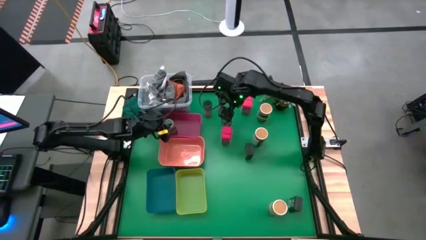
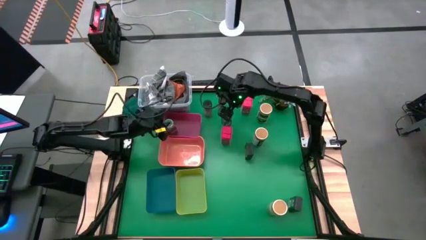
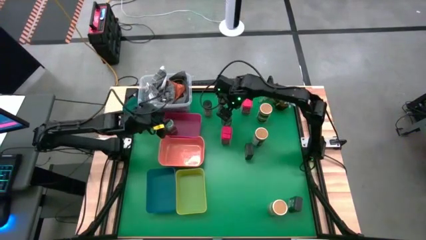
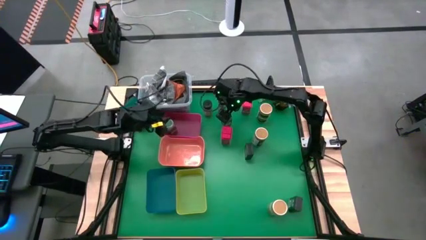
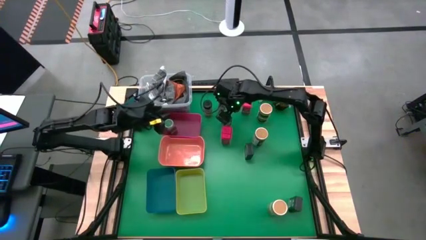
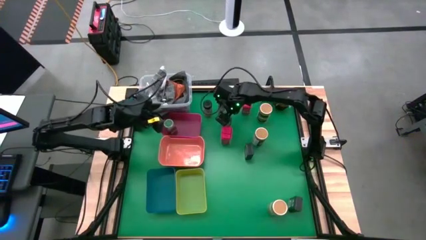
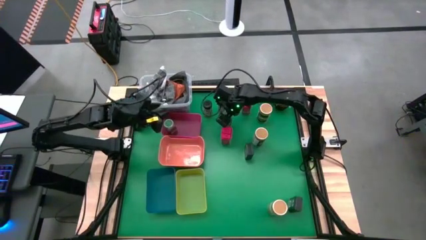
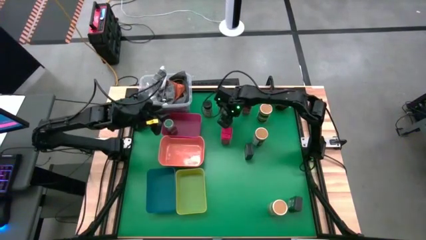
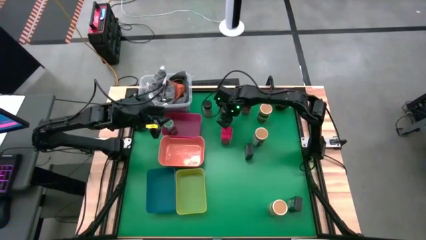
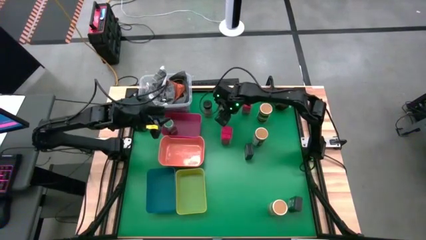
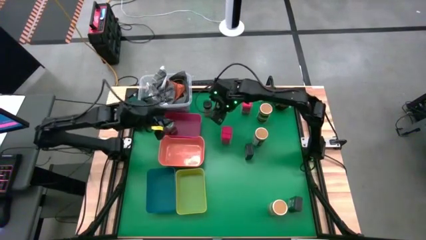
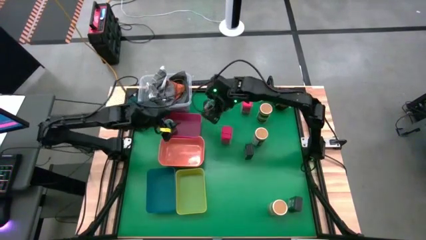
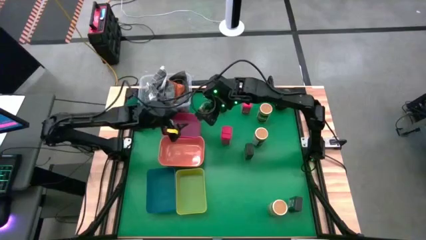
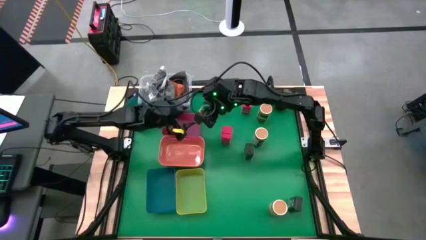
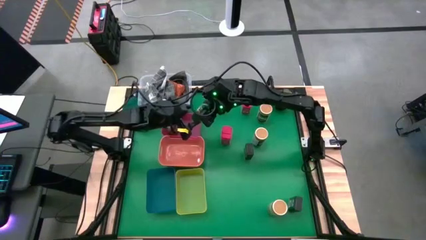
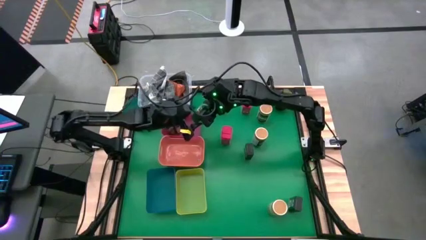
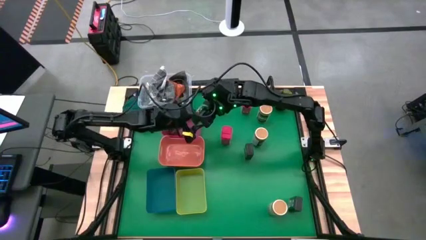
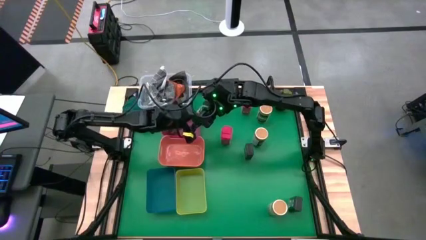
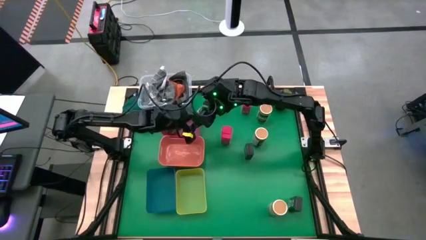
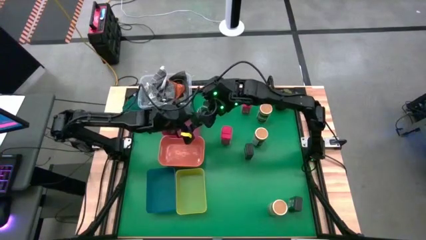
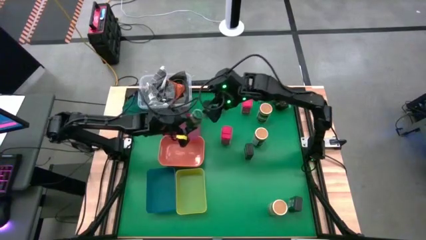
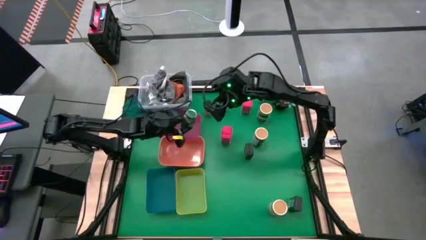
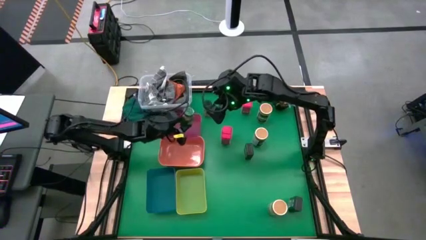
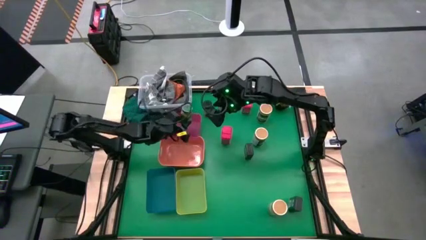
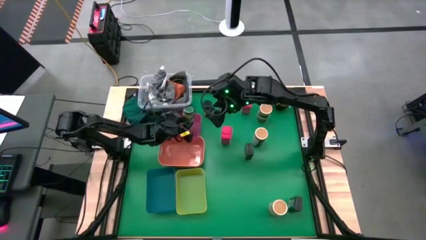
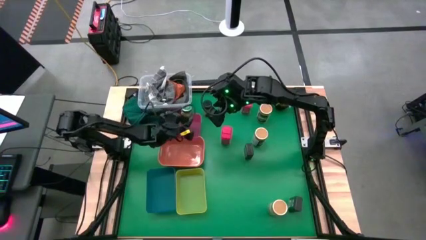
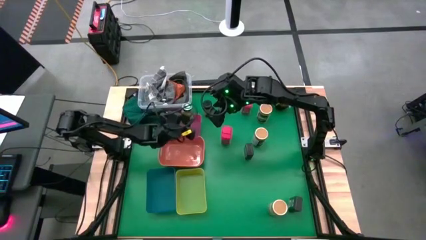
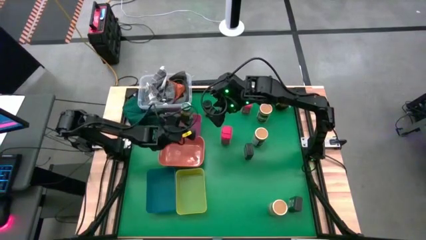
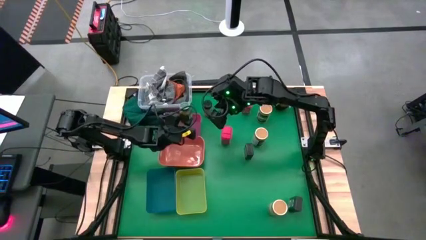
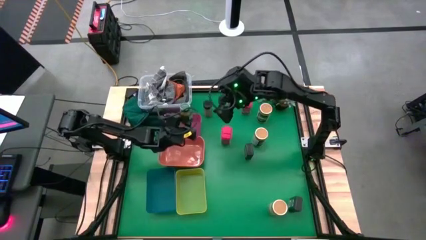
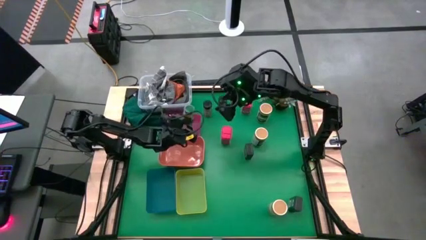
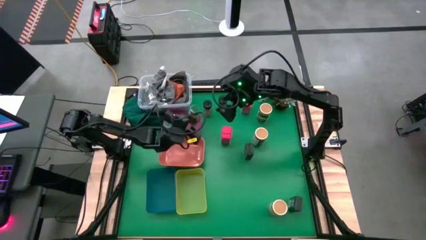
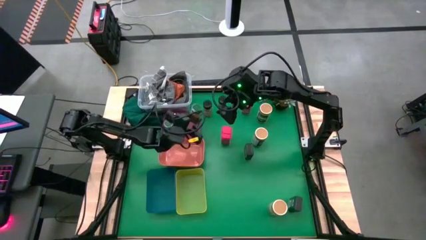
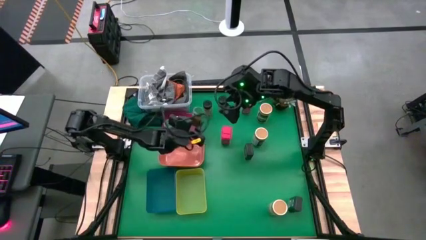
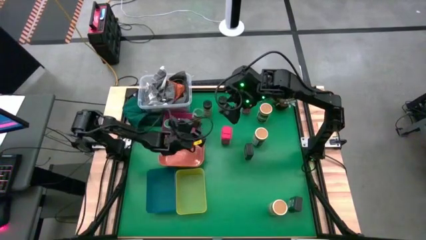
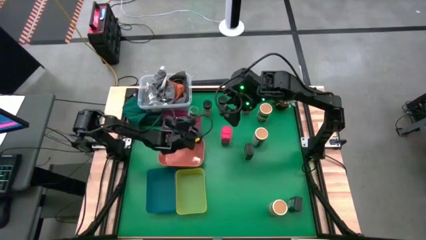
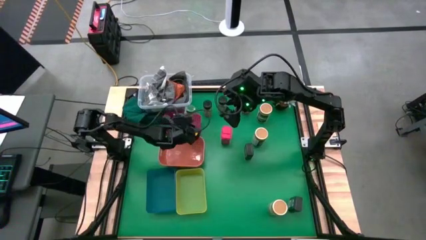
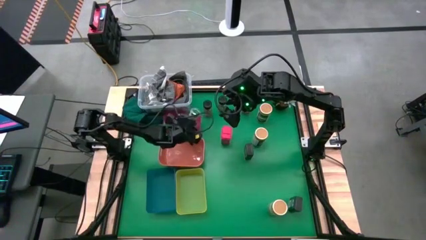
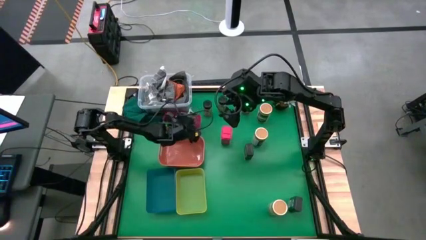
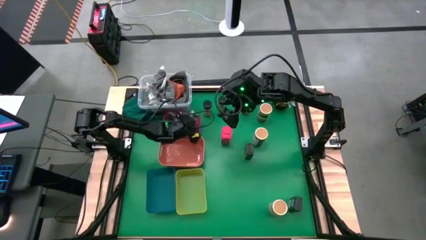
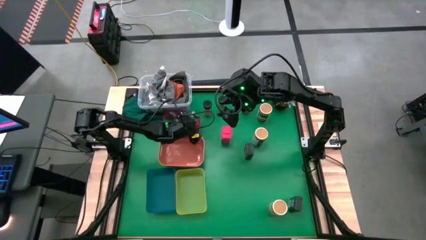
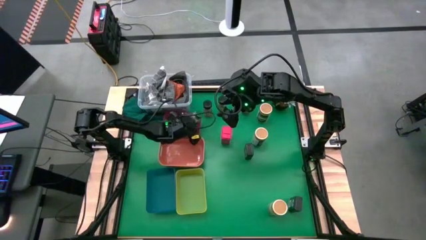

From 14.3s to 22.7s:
Task: Sort spices by type
Put the green seasoning bottle into the red bin

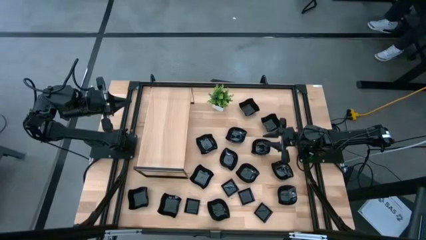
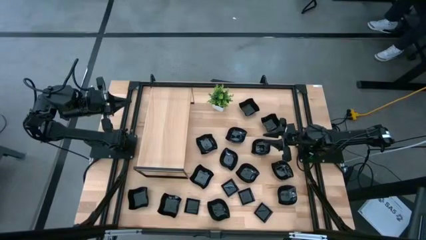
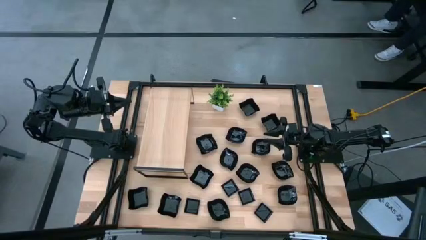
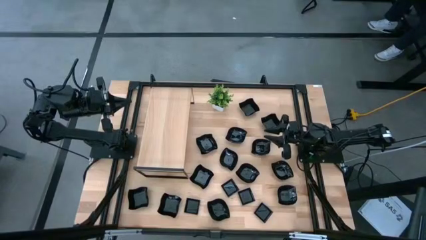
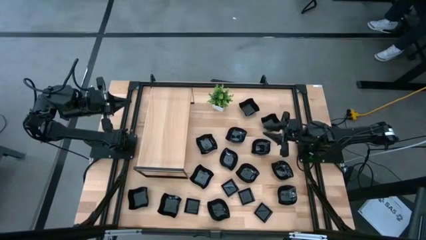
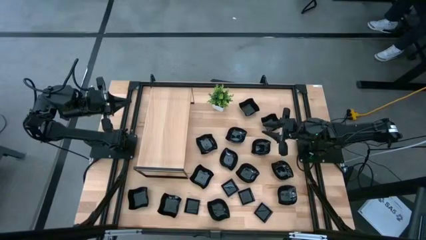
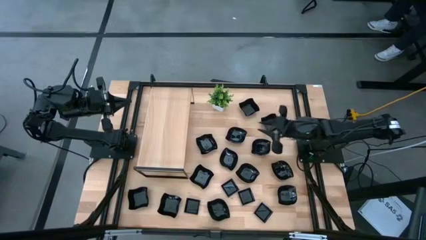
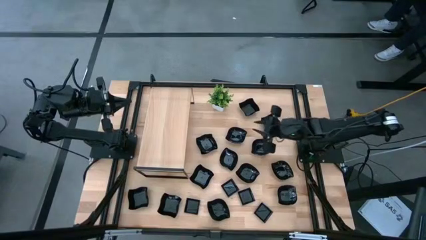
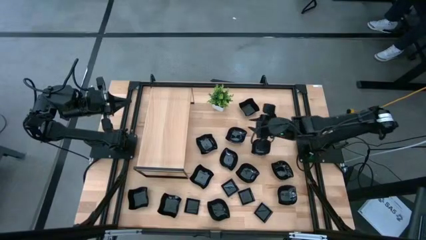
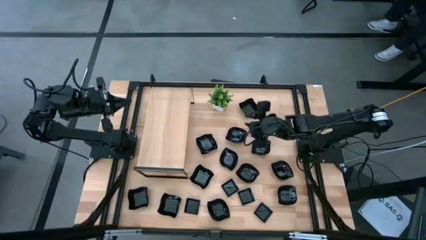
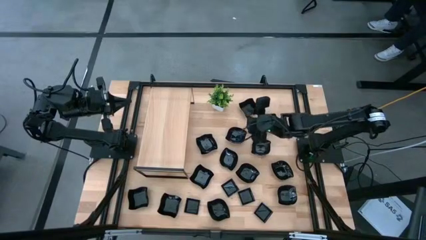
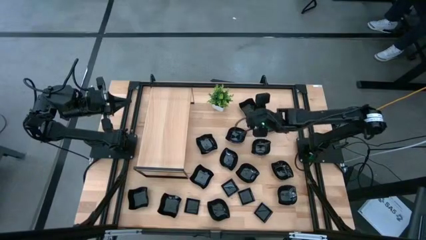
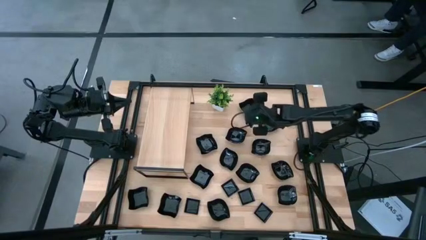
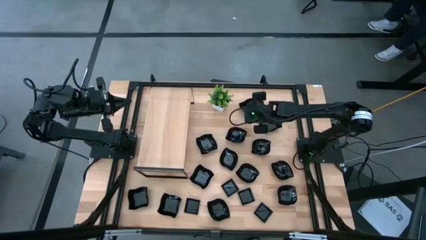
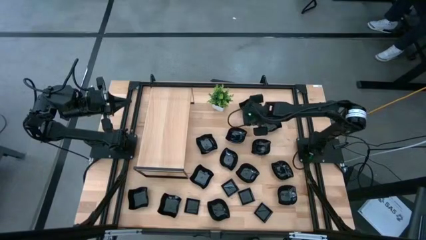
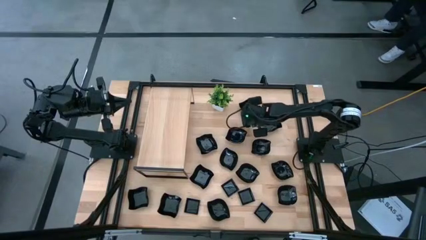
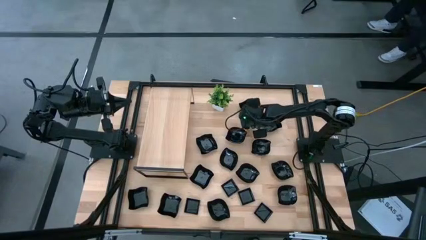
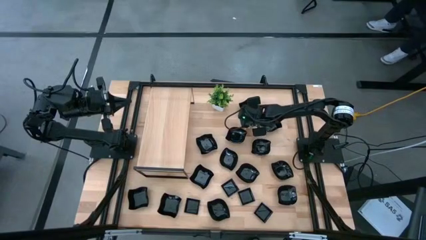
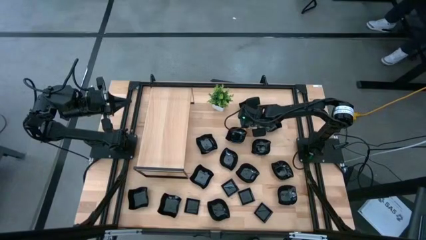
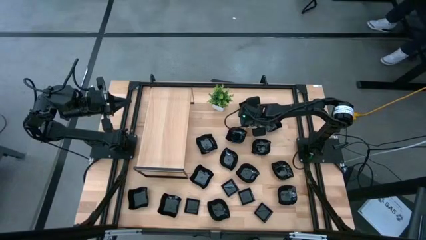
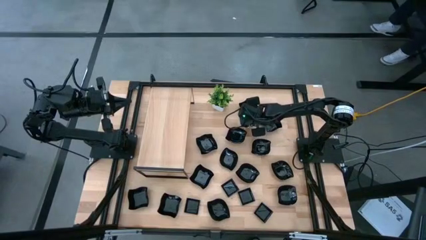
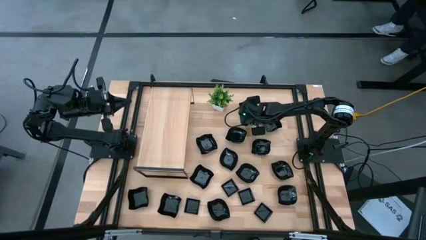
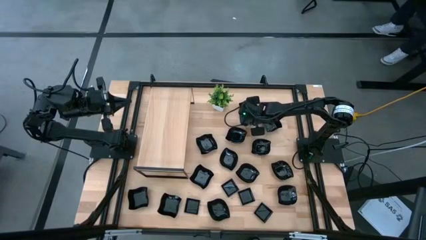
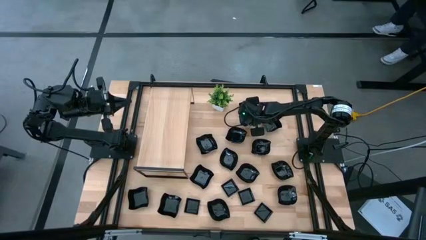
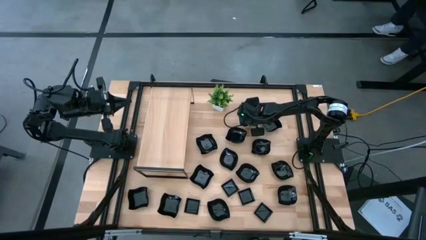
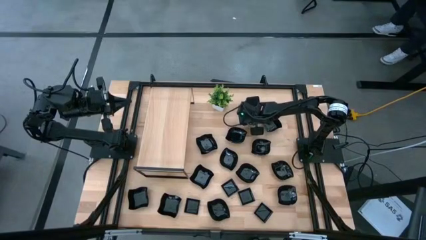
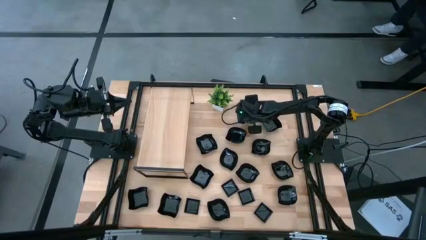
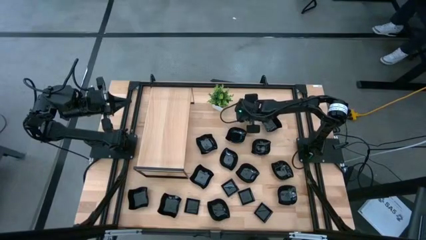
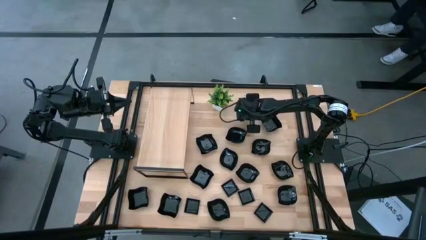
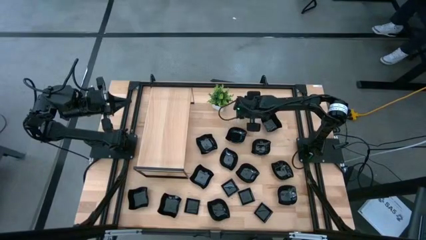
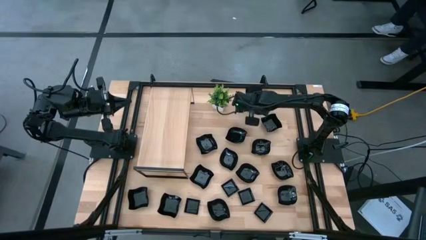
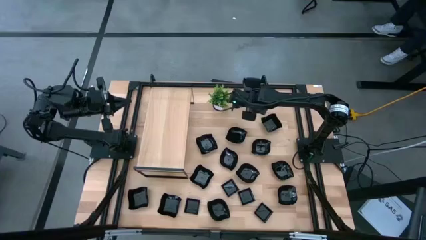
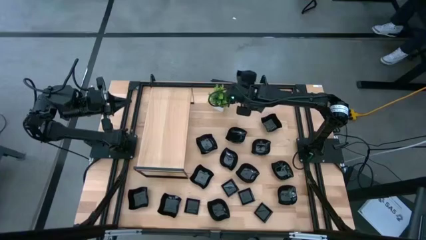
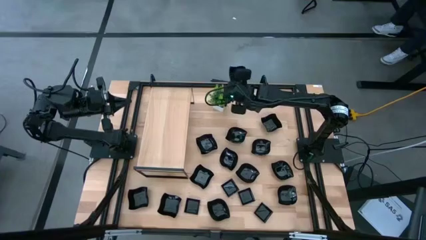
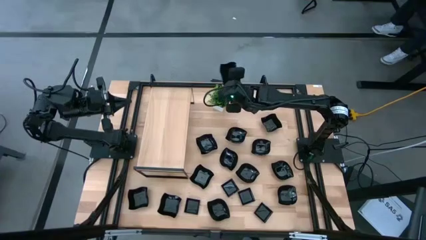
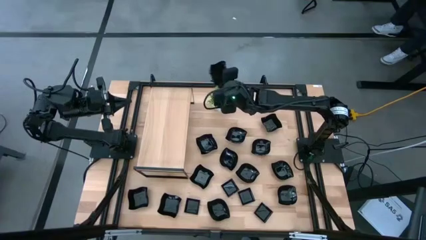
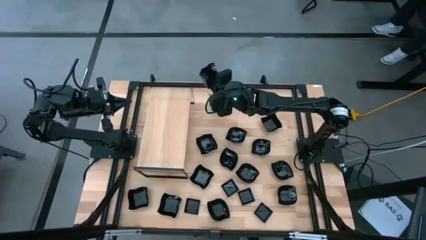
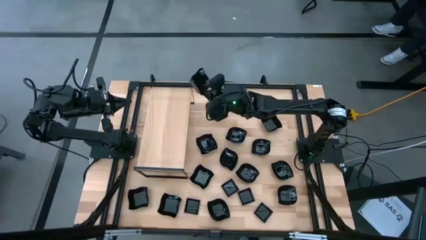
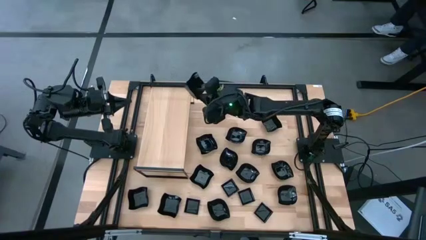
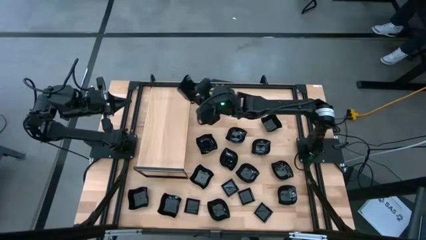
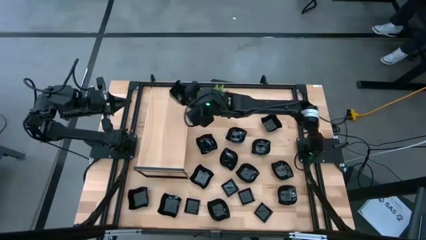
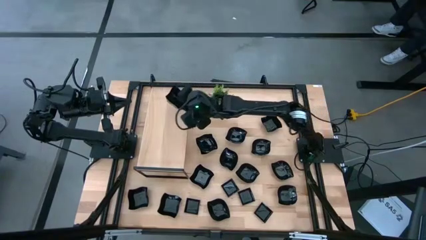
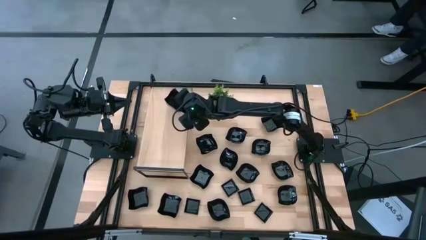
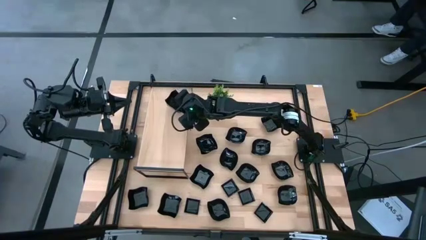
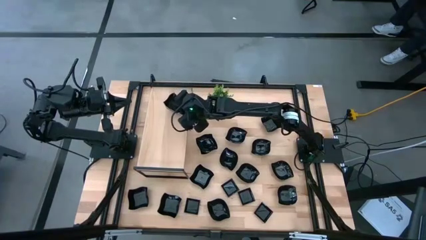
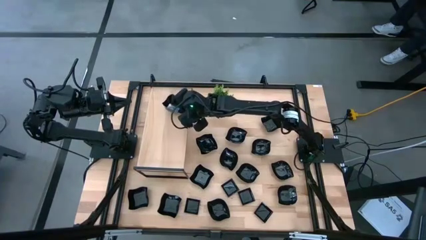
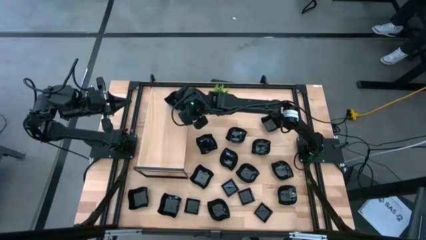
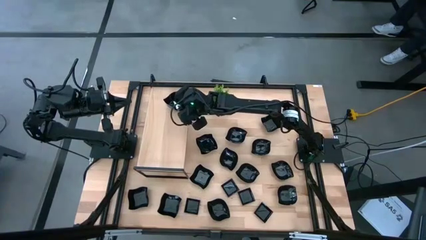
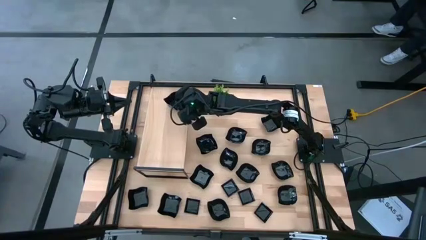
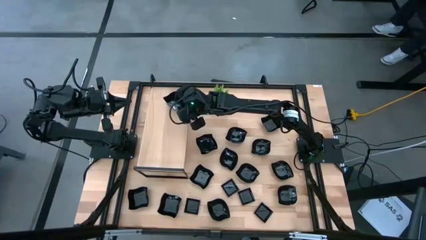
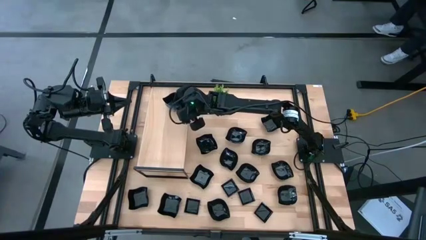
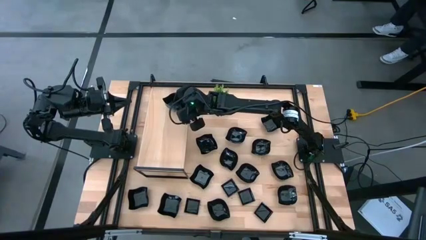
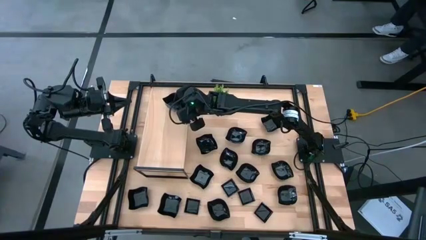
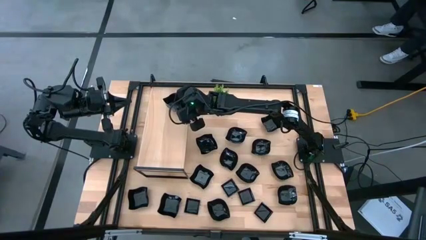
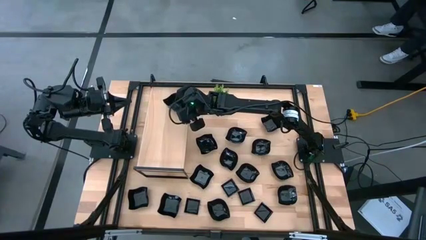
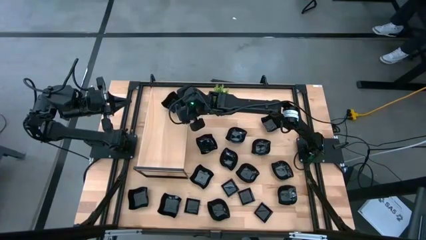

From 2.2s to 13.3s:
Task: Pick & Place Mini shaped plates
Put the black distorted square plate on top of the shelf
